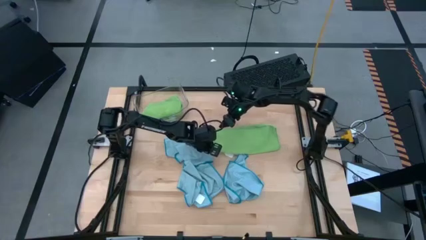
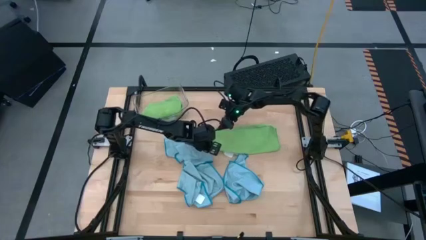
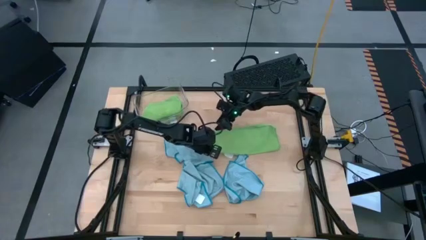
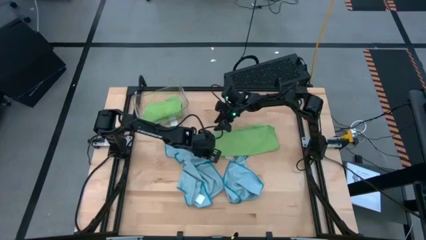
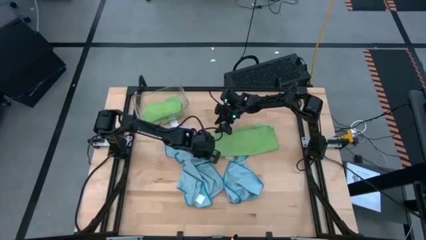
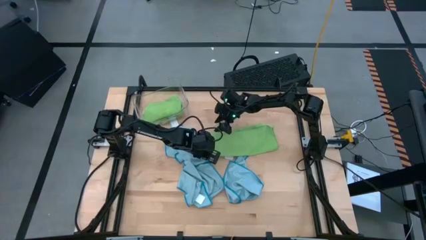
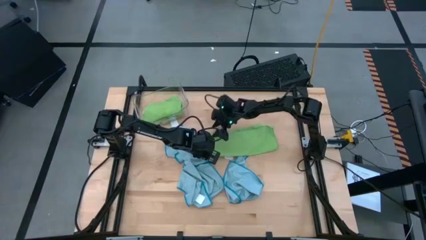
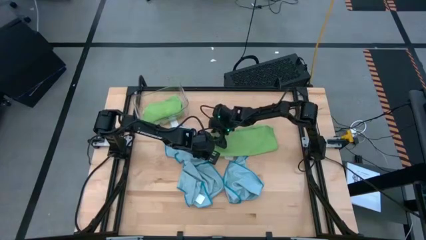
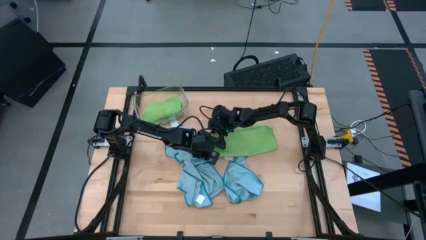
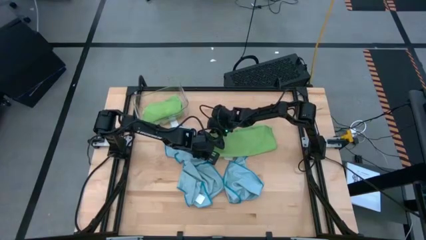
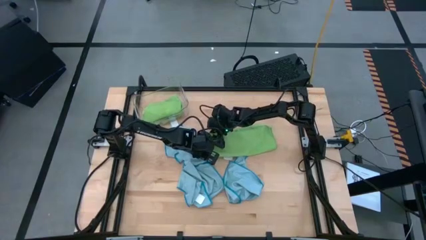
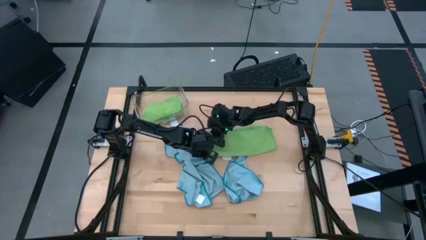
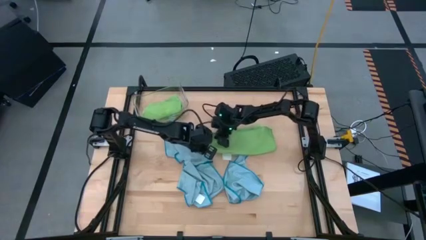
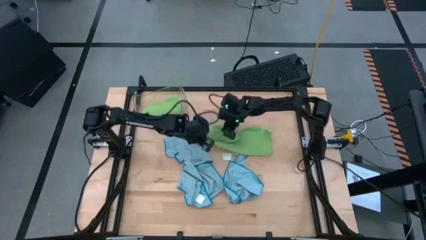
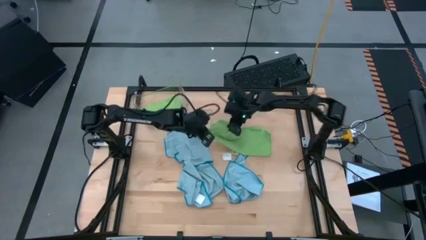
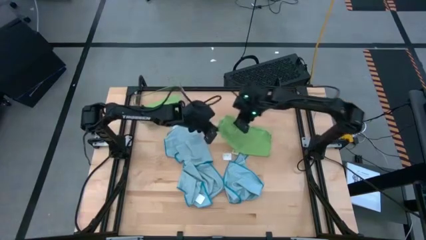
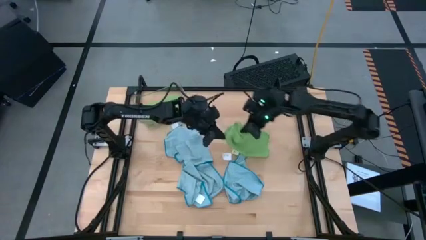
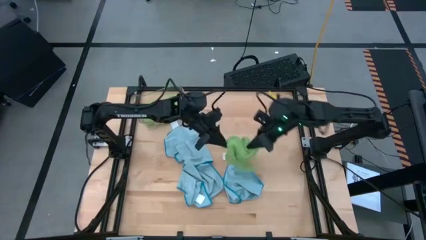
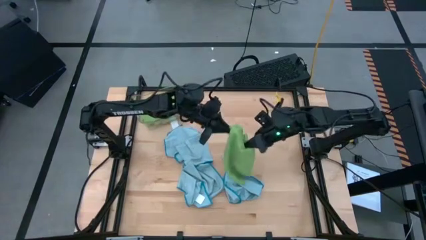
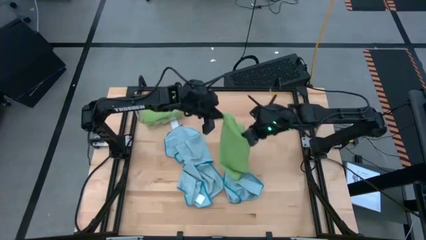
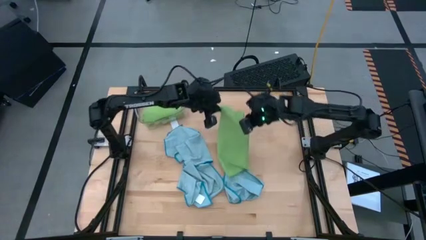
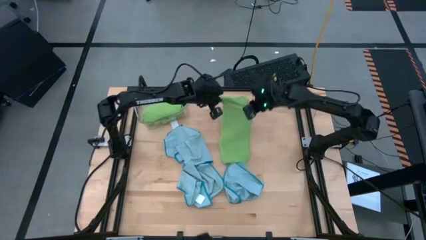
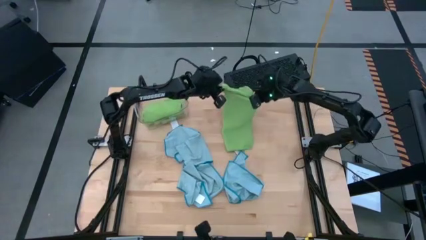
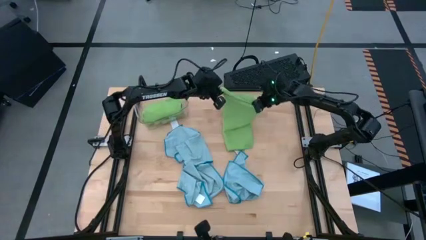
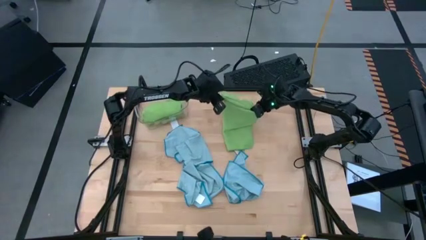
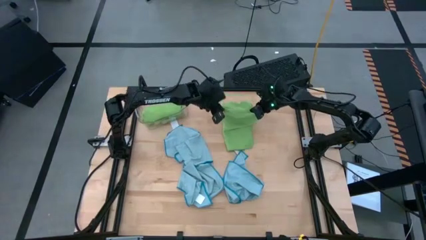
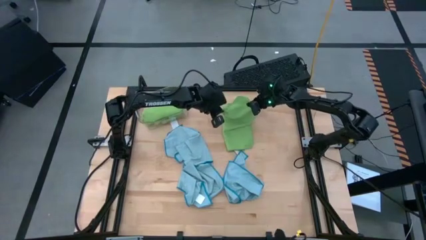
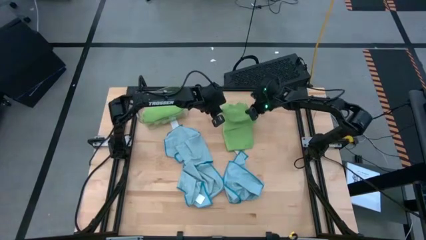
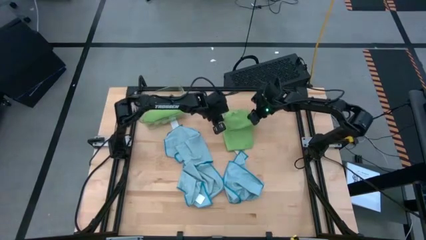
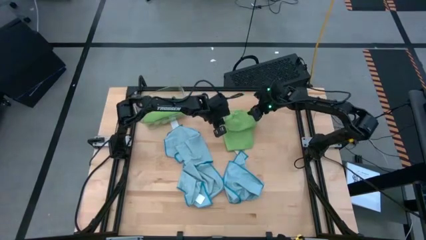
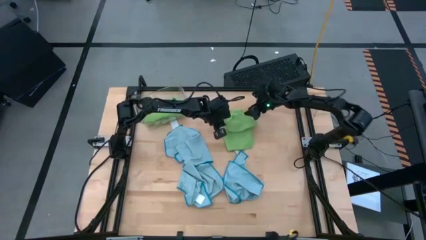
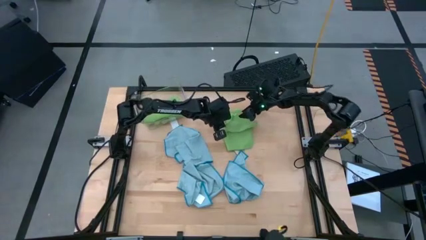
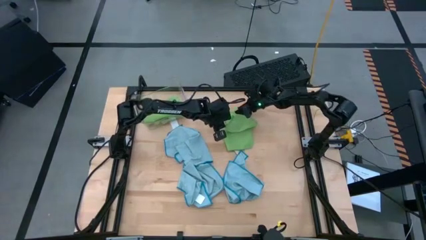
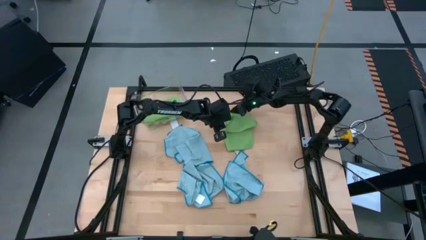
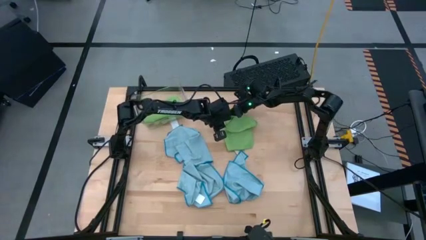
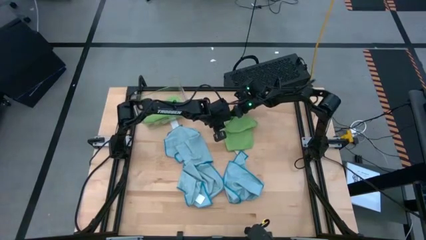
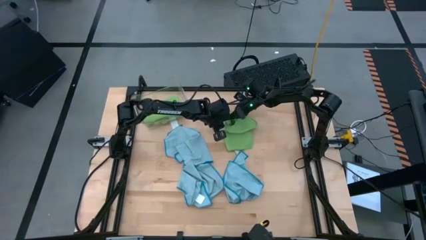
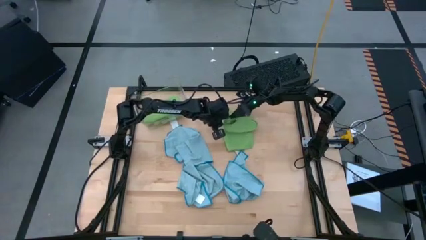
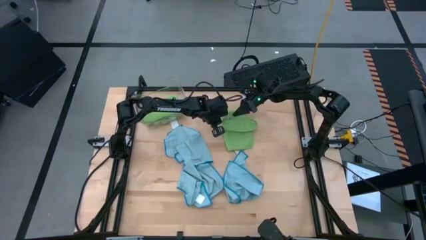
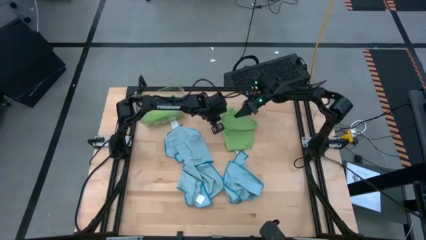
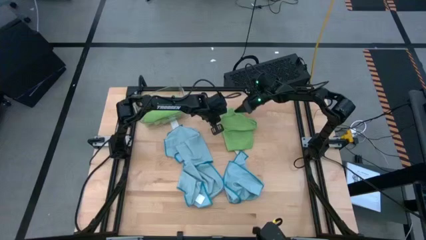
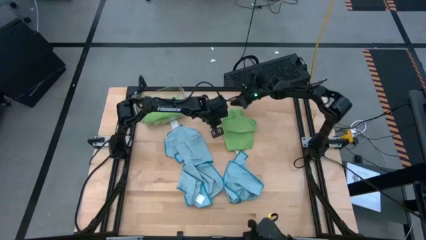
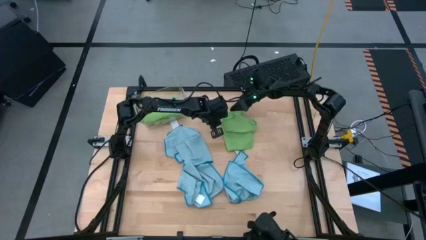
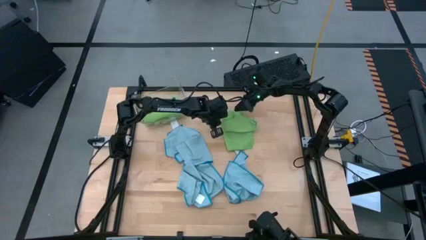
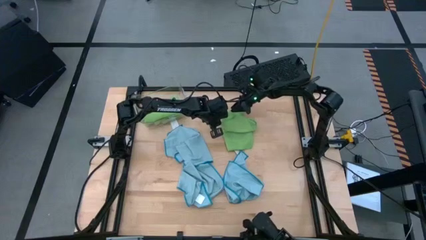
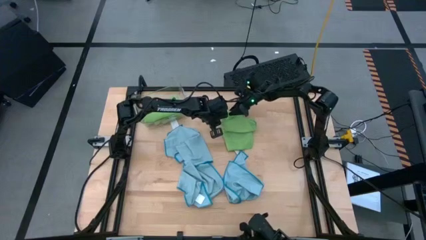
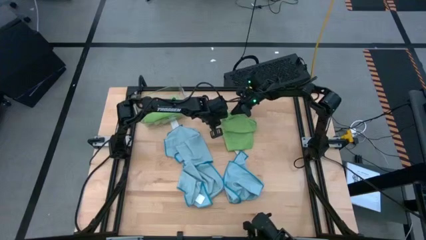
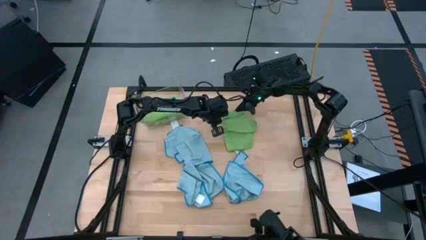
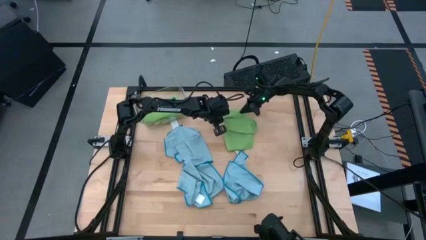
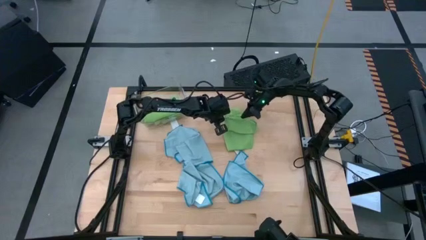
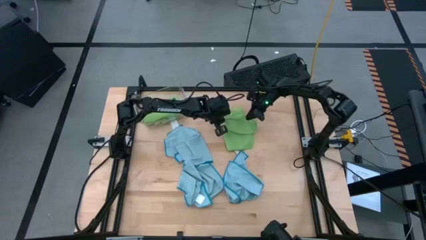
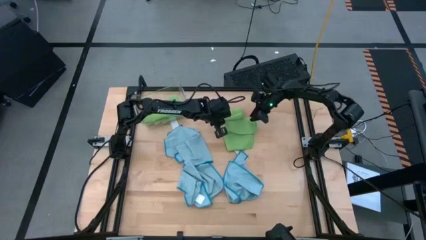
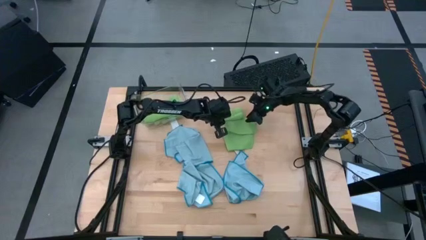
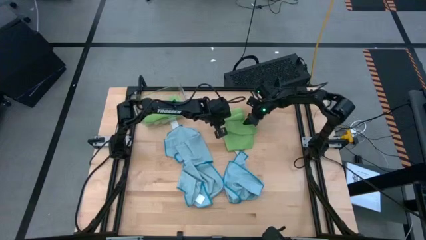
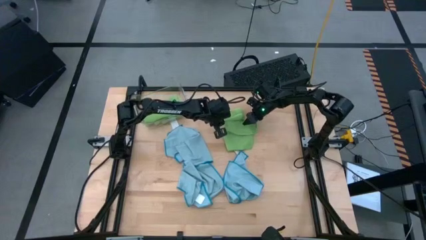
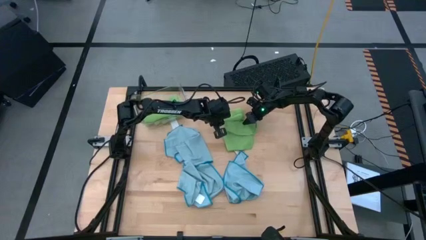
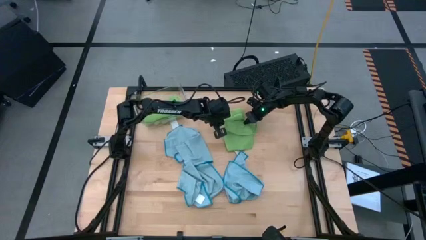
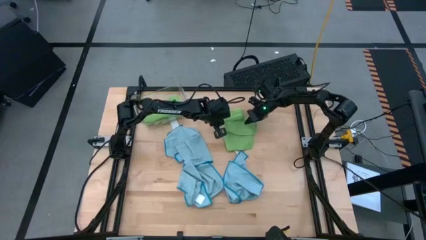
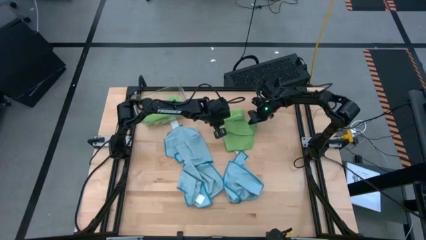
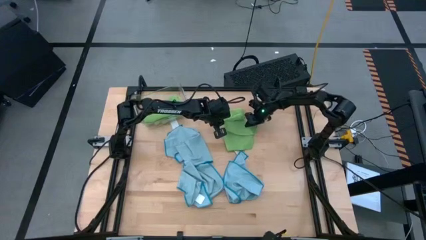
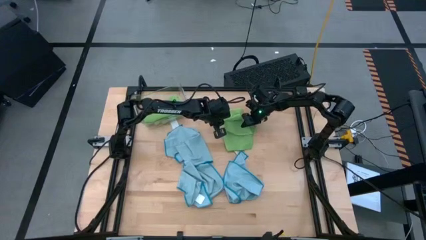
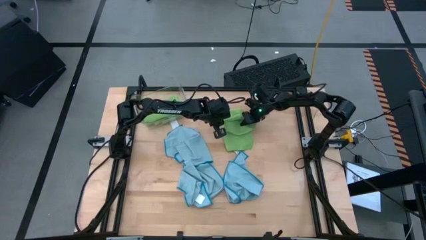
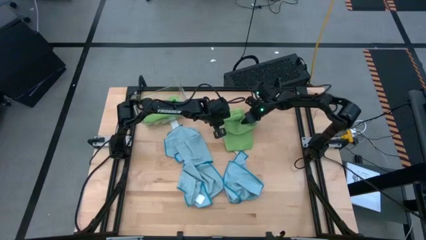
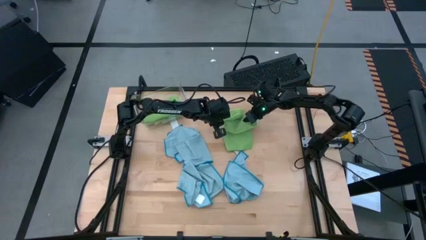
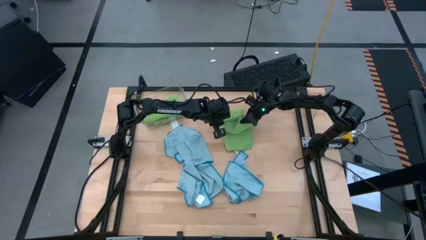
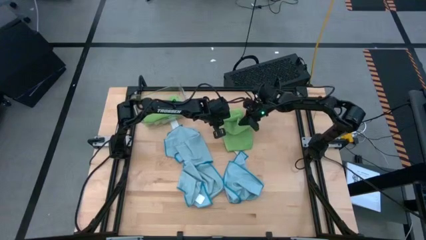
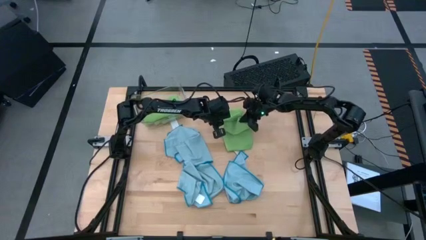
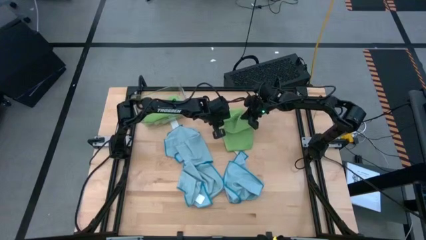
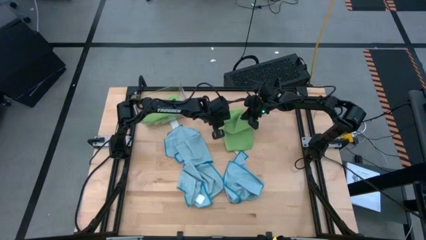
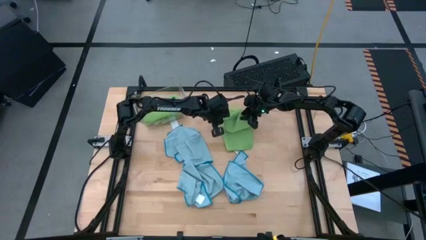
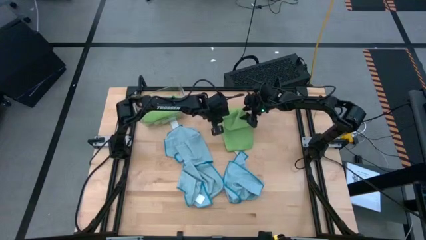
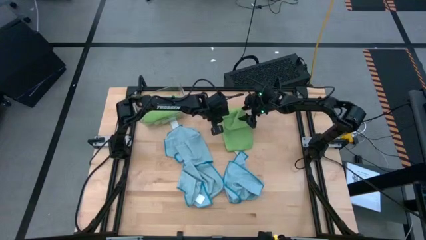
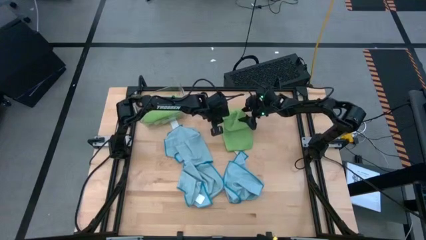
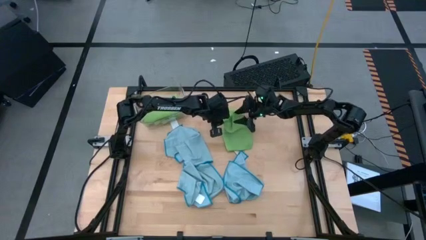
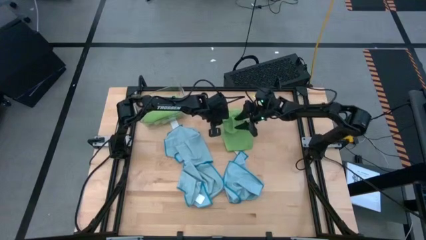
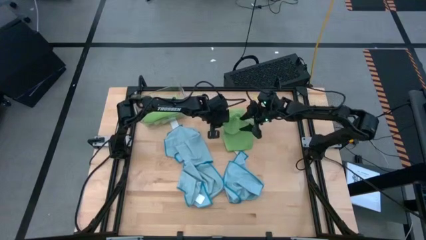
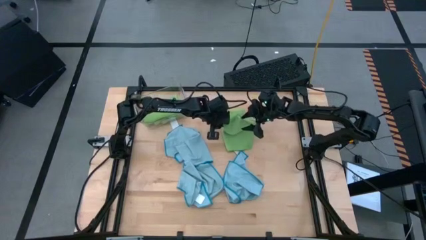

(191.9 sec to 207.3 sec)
Task: Fold microfiber towels
Fold the green microfiber cloth
